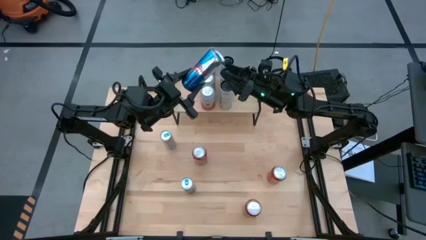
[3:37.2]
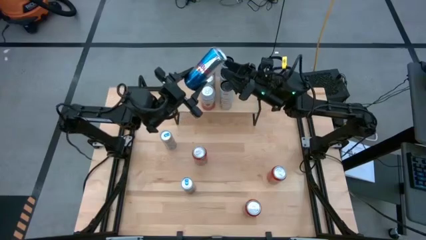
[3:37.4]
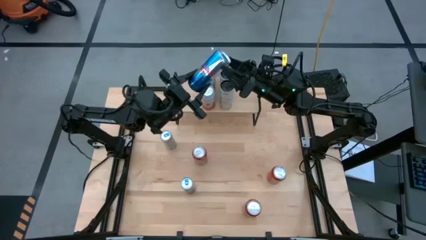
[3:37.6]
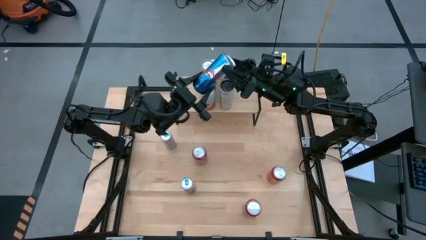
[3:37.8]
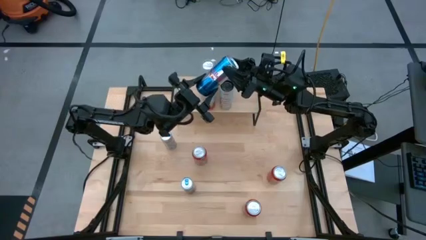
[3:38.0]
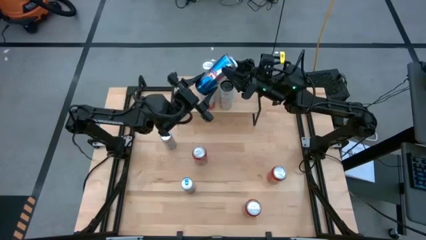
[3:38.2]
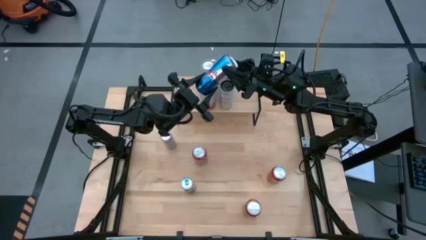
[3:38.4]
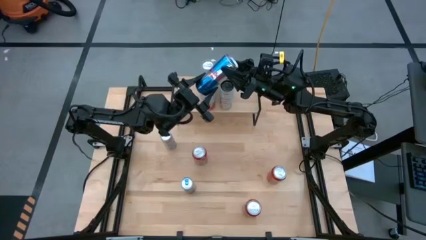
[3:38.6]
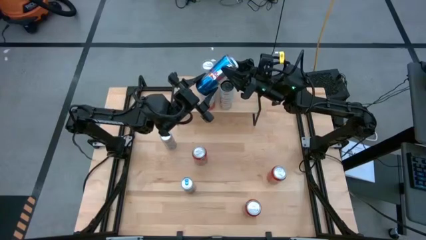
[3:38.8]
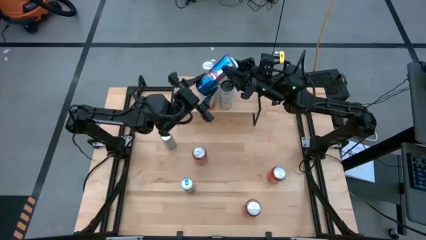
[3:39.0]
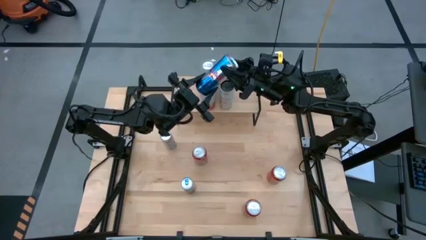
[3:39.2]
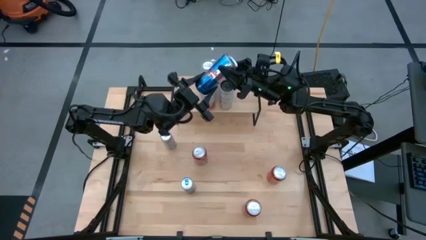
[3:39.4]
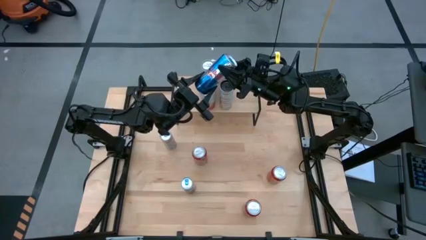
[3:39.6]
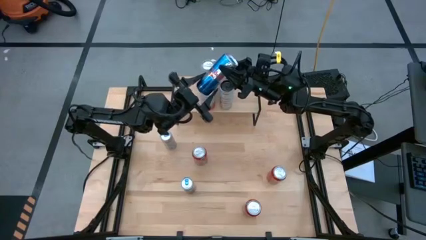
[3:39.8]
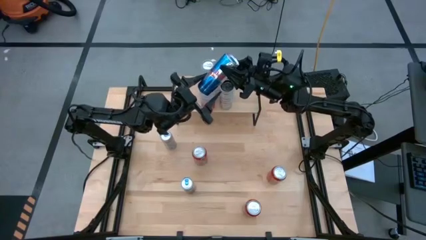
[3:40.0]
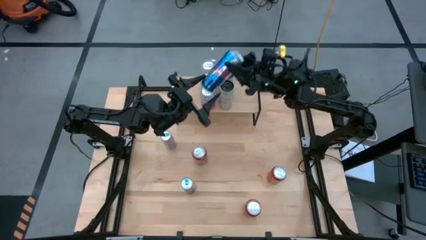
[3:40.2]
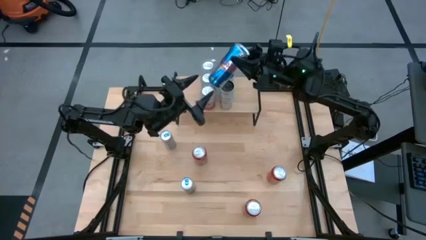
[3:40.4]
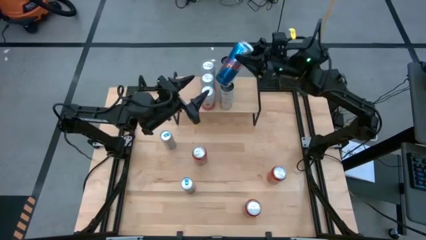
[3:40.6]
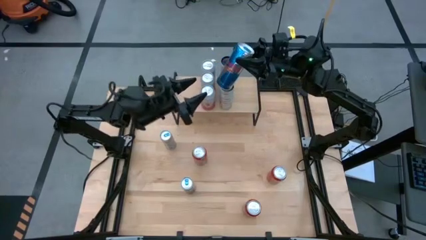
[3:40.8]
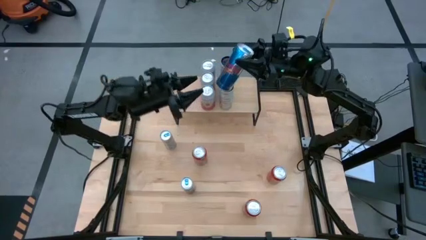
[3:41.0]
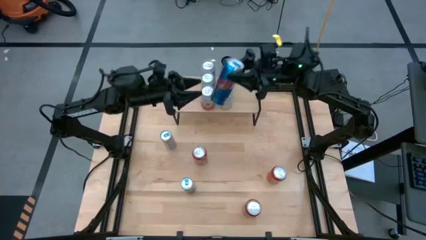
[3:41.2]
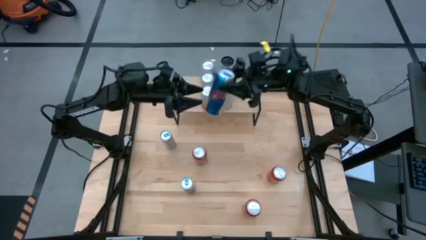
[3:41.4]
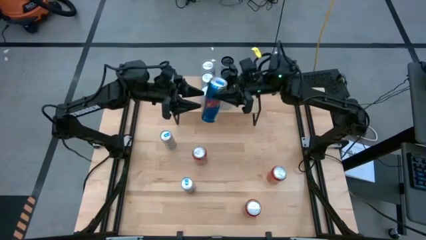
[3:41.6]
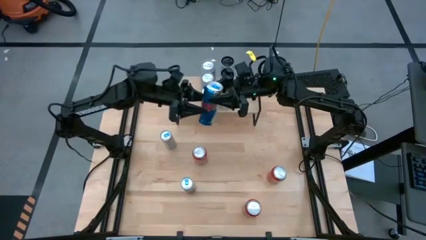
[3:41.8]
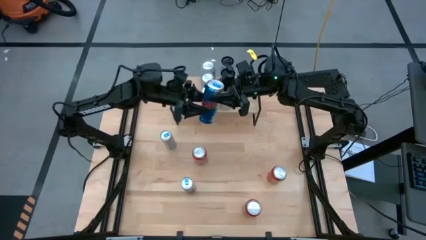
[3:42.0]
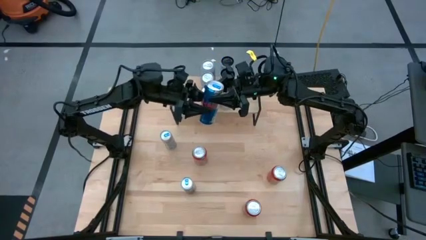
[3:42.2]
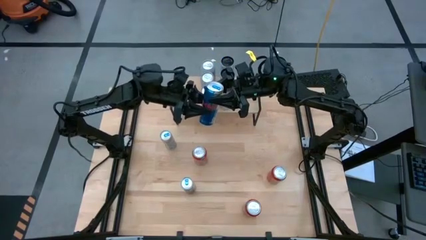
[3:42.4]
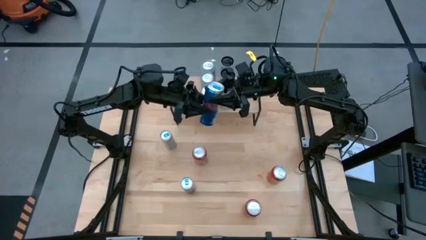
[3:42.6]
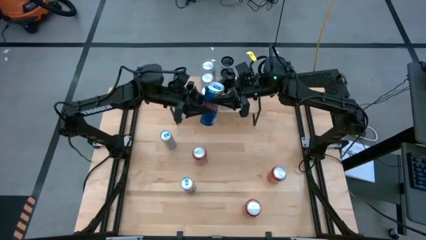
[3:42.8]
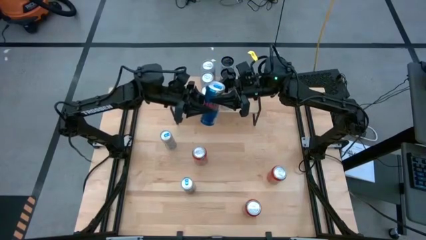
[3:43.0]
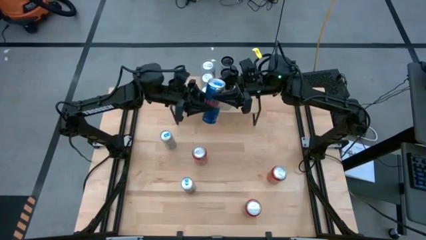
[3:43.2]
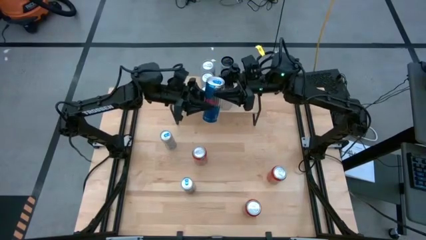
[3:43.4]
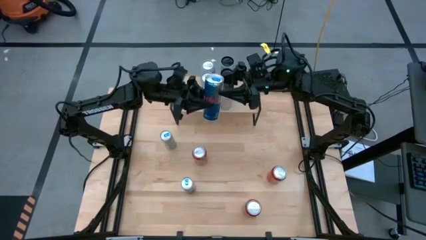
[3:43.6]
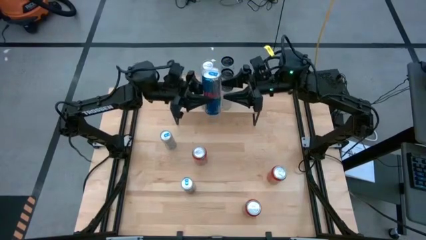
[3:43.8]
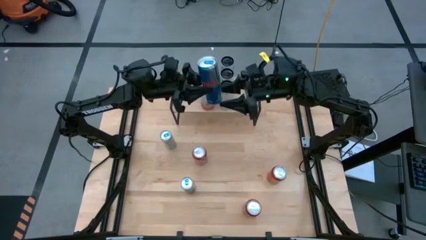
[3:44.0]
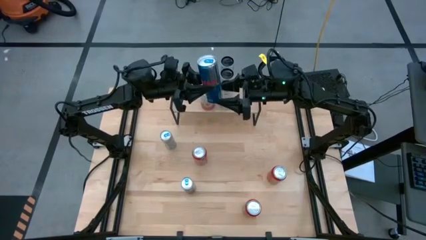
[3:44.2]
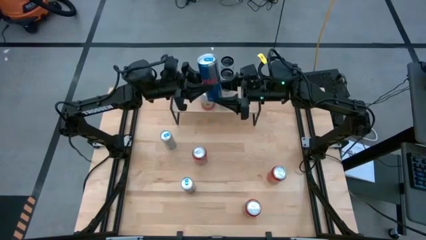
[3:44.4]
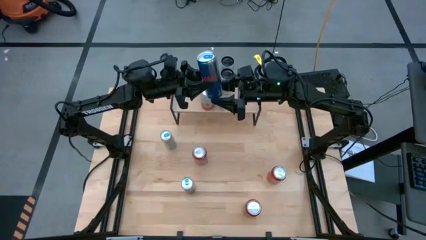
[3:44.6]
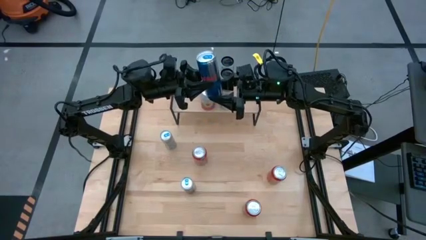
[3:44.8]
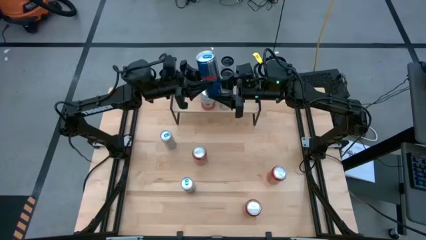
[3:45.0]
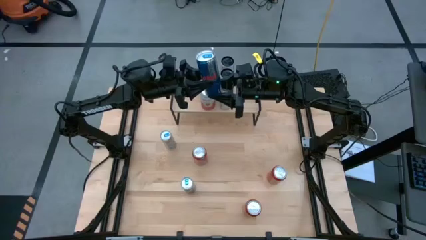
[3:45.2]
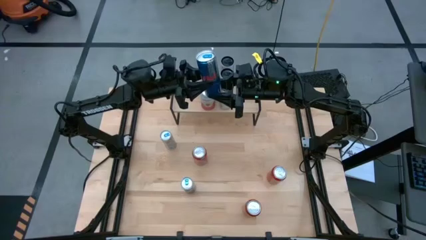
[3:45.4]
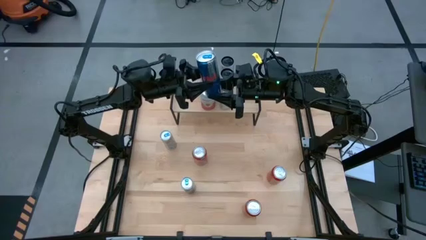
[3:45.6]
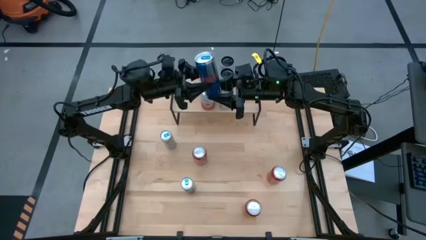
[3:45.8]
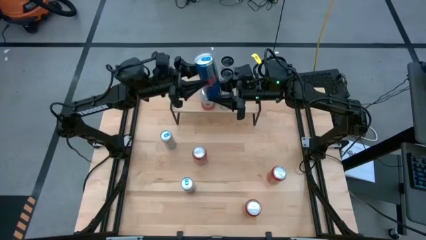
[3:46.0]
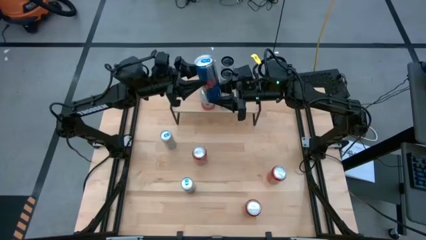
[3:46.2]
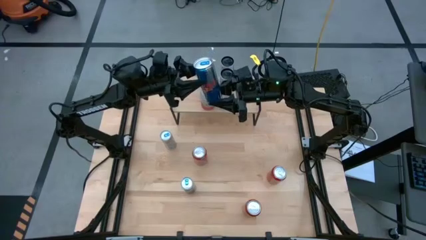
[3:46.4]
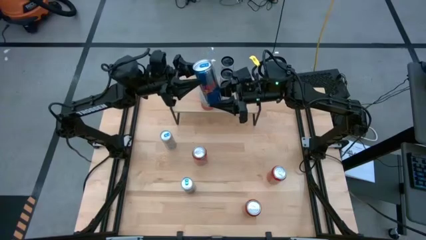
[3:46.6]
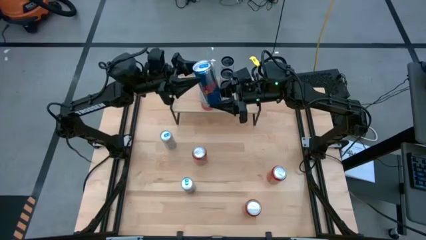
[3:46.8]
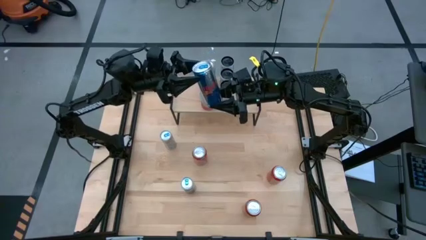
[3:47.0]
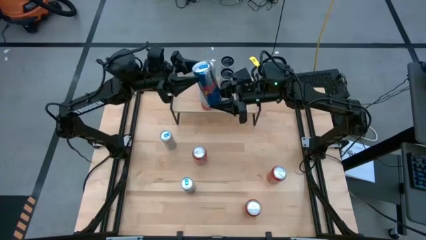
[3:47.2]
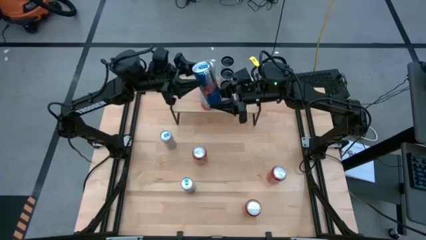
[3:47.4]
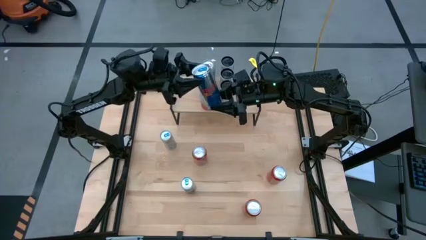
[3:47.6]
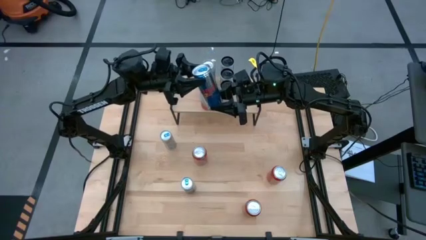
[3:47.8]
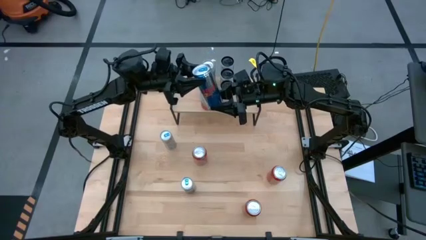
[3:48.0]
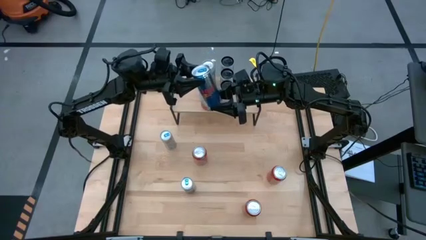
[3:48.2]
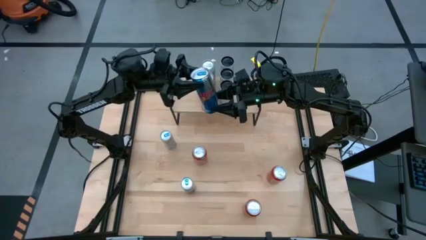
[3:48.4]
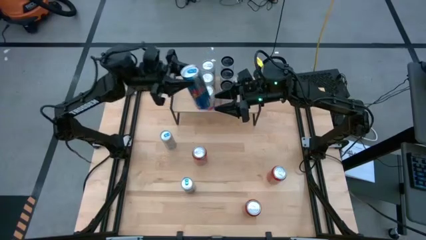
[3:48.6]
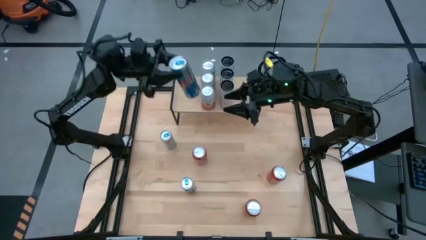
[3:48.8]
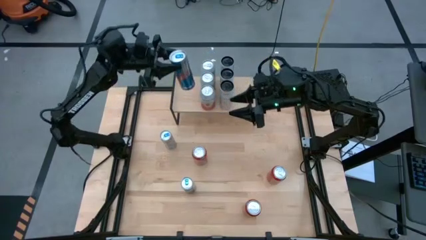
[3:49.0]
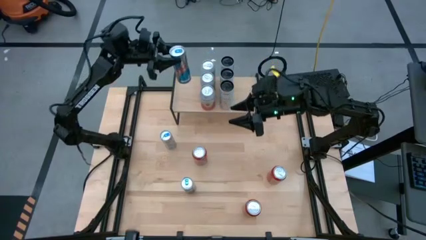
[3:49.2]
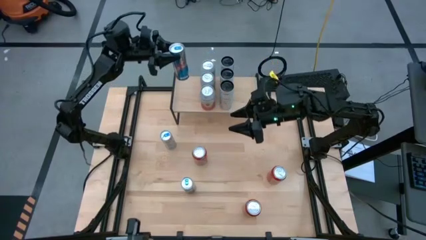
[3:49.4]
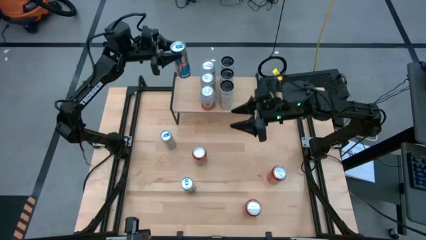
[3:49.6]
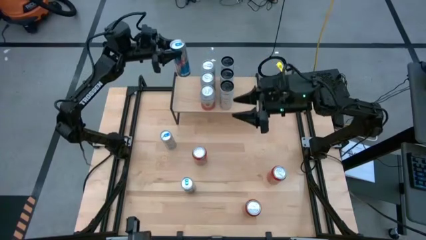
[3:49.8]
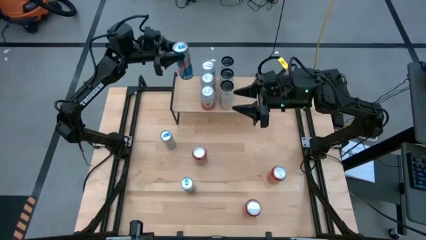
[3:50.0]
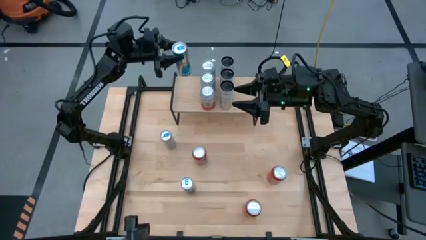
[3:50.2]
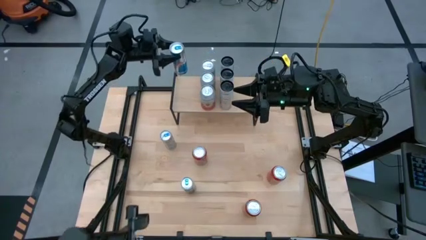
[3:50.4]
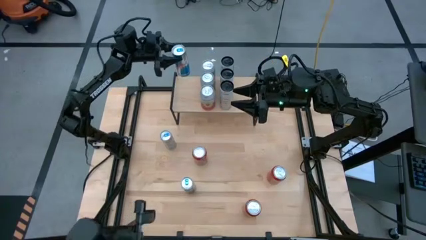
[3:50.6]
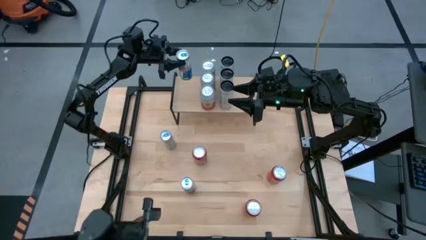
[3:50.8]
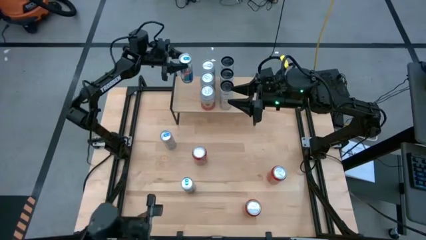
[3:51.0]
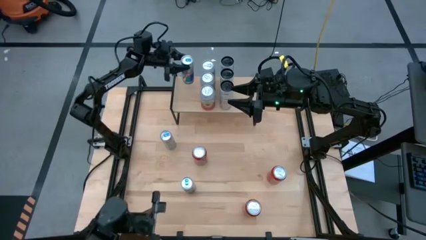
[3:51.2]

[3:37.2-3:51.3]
Task: Place canned beverage on shelf
Put the top right blue soda can on the shelf
